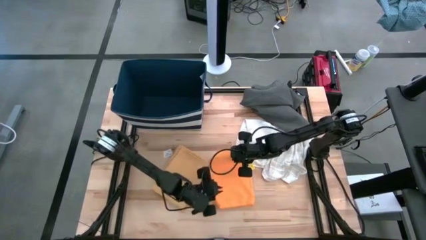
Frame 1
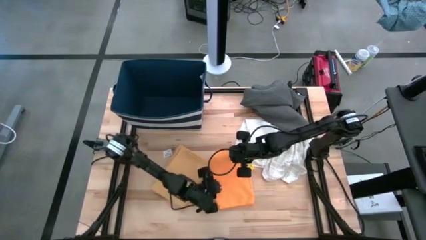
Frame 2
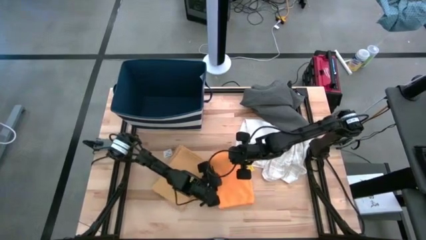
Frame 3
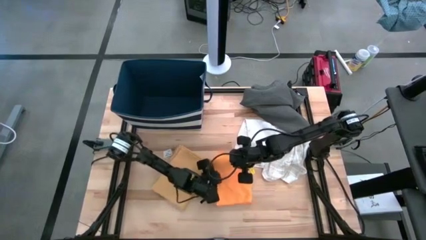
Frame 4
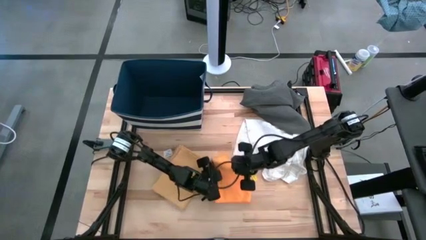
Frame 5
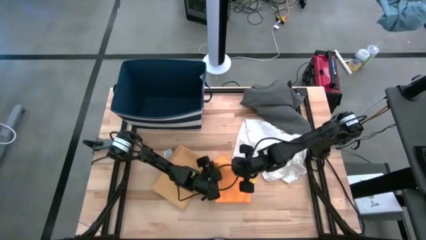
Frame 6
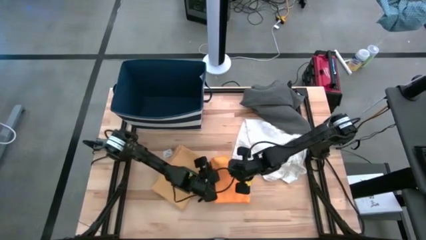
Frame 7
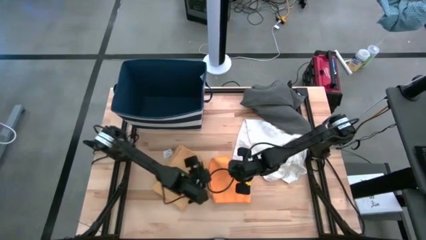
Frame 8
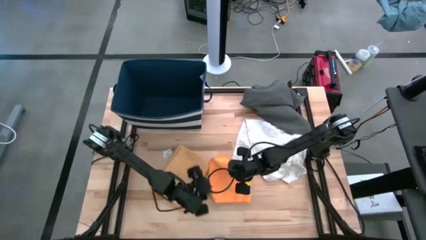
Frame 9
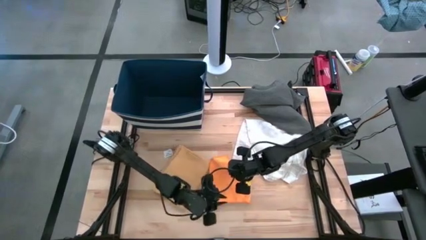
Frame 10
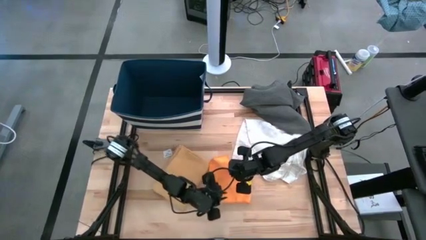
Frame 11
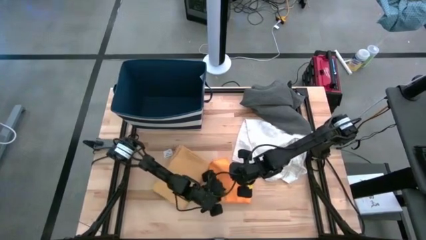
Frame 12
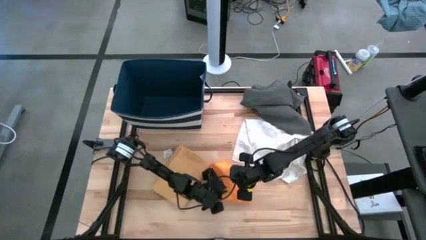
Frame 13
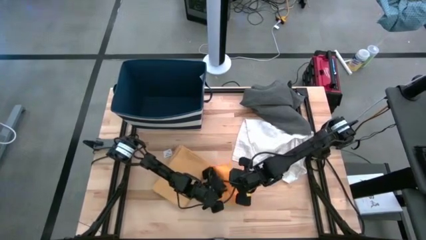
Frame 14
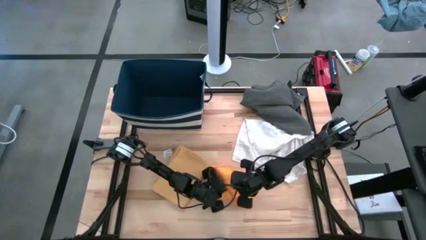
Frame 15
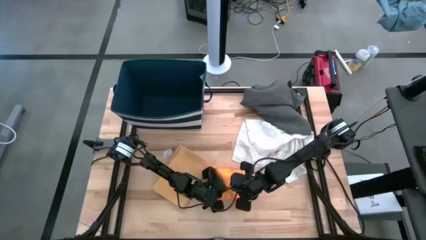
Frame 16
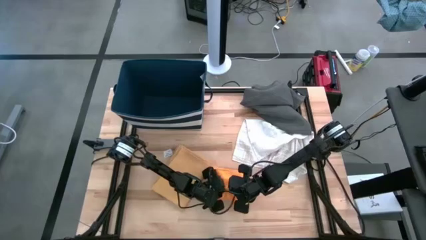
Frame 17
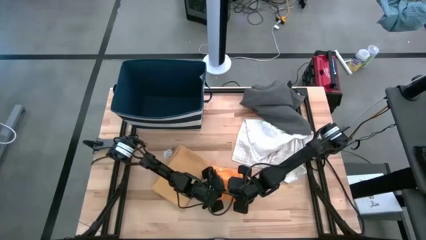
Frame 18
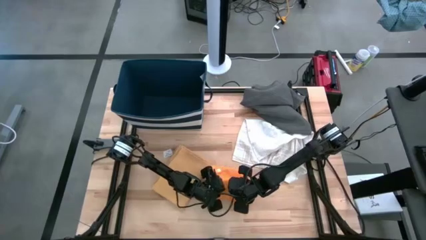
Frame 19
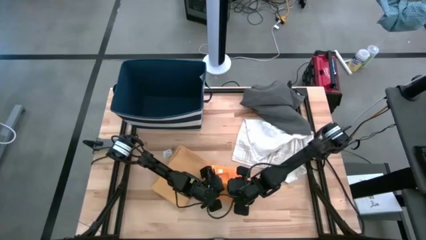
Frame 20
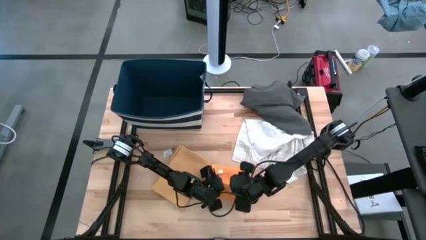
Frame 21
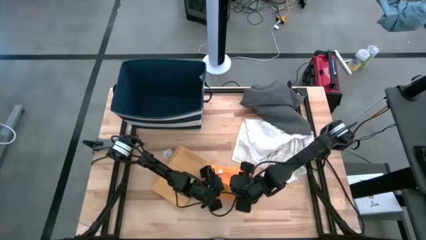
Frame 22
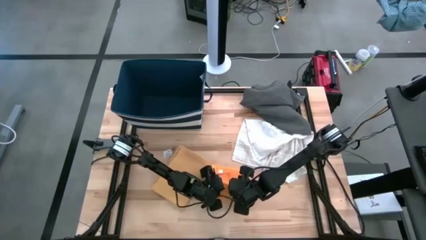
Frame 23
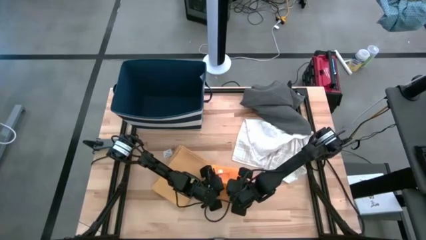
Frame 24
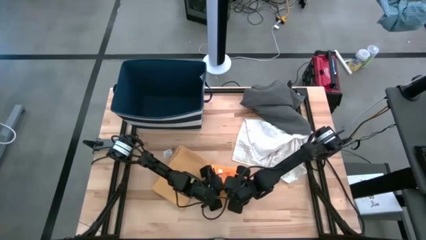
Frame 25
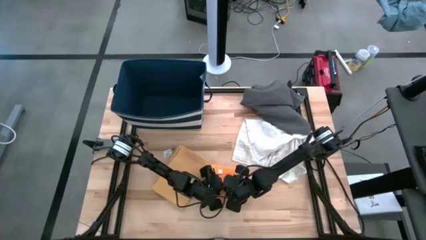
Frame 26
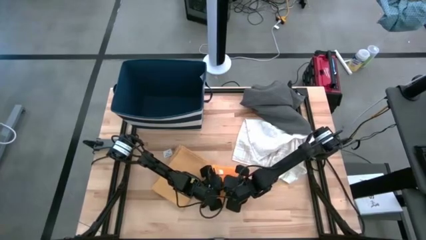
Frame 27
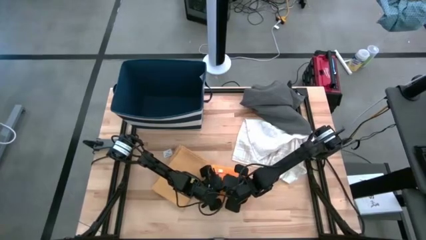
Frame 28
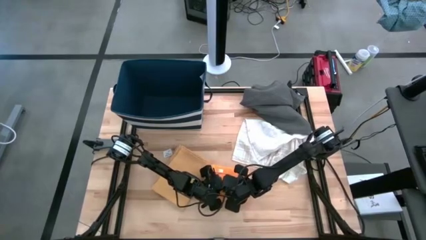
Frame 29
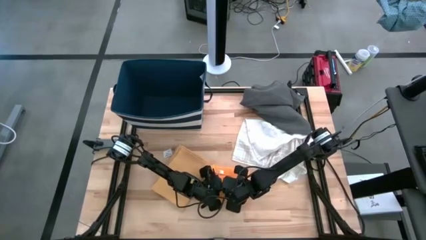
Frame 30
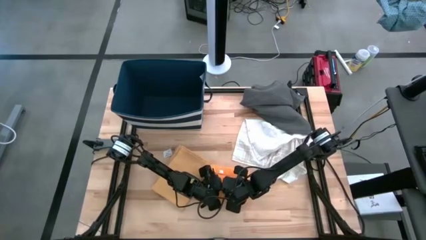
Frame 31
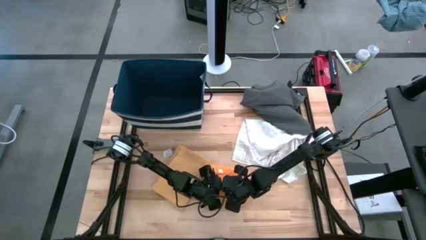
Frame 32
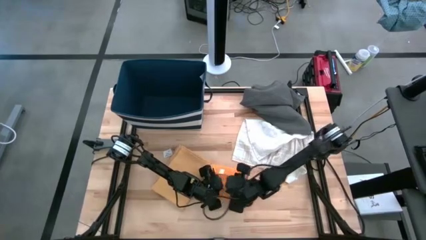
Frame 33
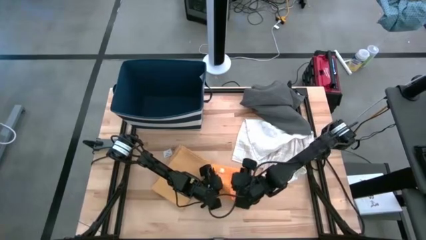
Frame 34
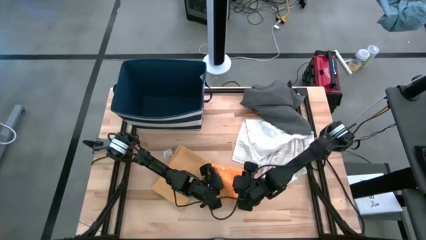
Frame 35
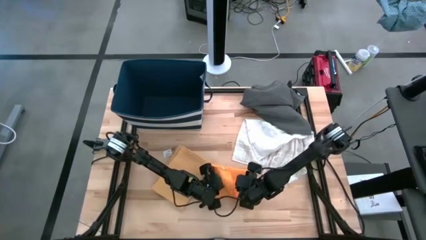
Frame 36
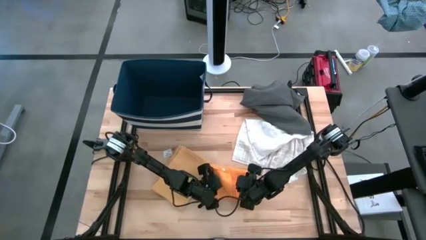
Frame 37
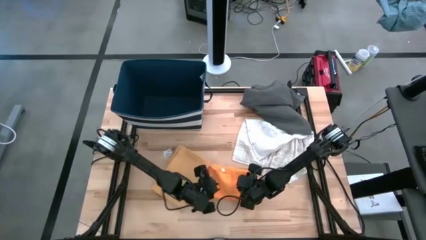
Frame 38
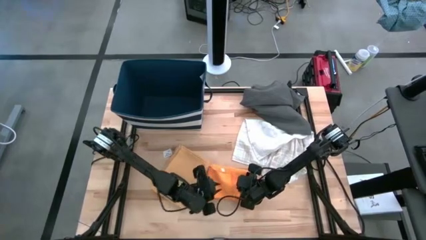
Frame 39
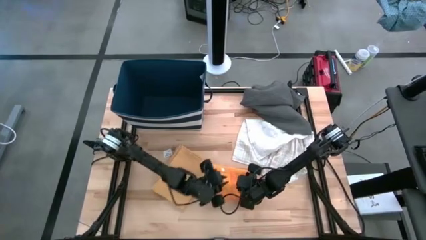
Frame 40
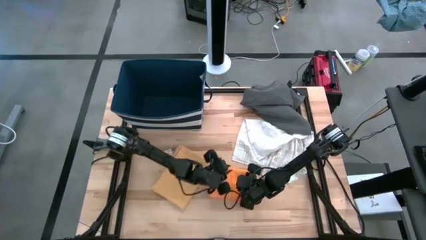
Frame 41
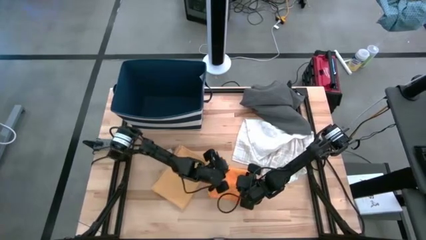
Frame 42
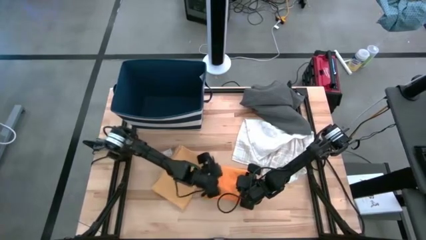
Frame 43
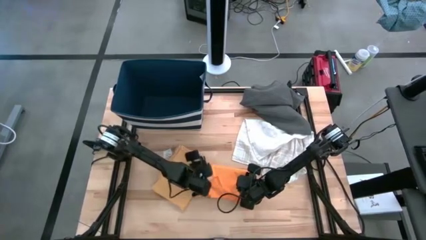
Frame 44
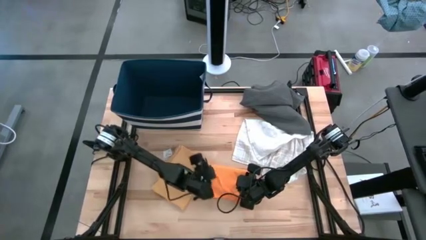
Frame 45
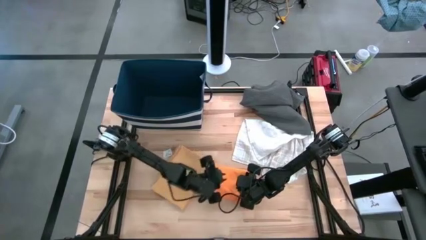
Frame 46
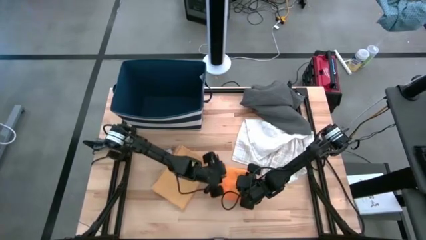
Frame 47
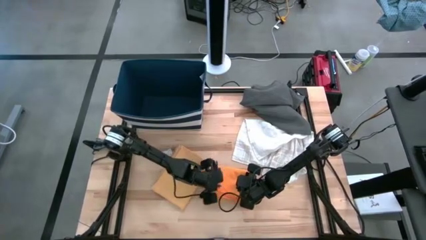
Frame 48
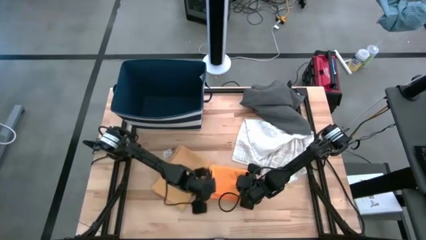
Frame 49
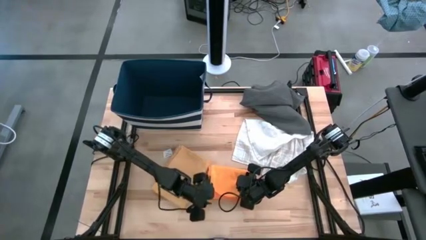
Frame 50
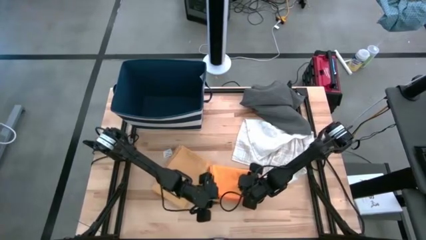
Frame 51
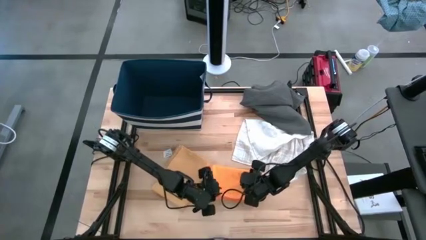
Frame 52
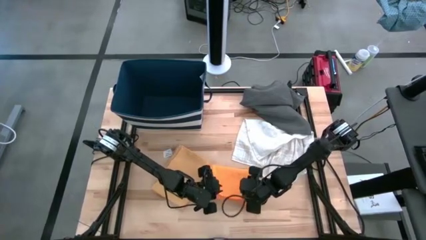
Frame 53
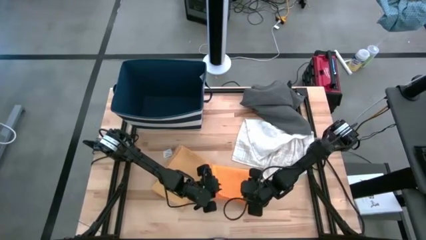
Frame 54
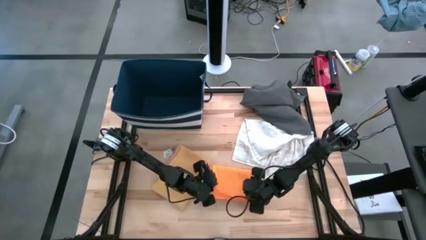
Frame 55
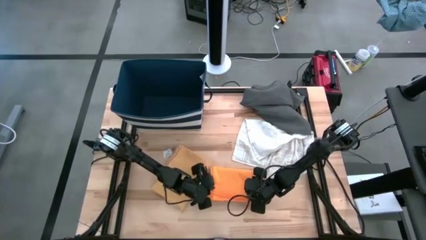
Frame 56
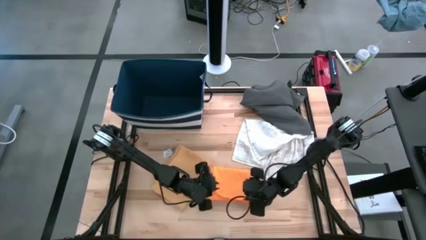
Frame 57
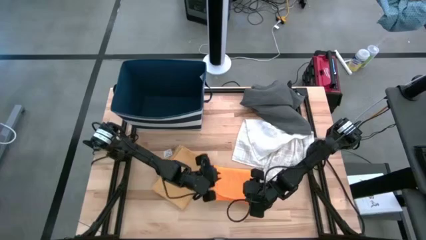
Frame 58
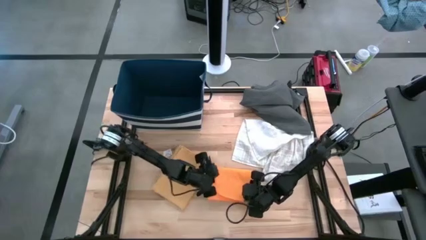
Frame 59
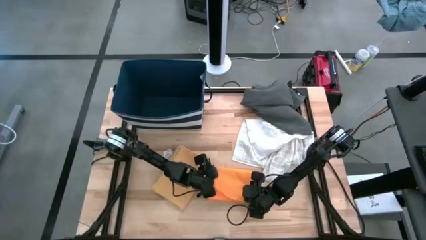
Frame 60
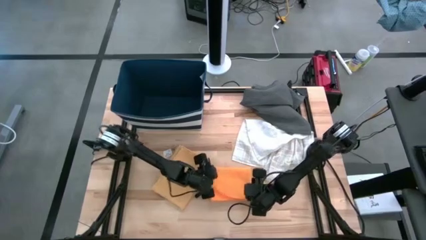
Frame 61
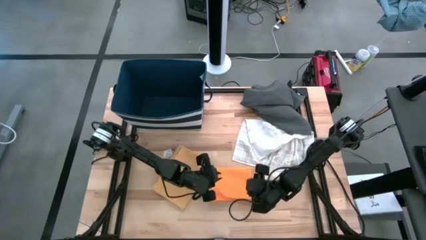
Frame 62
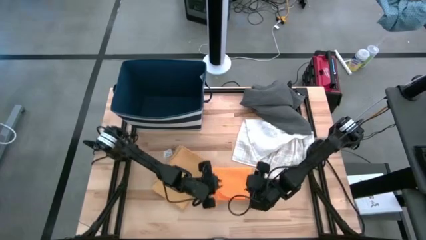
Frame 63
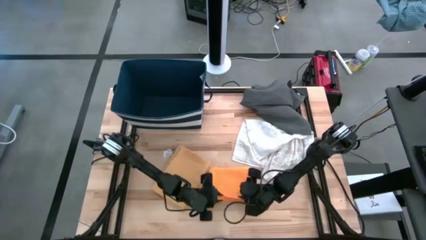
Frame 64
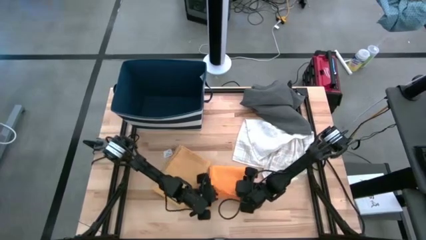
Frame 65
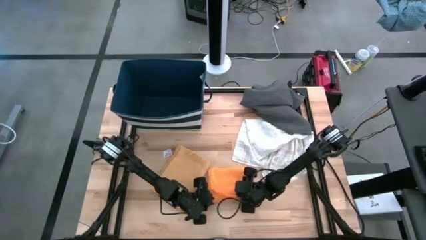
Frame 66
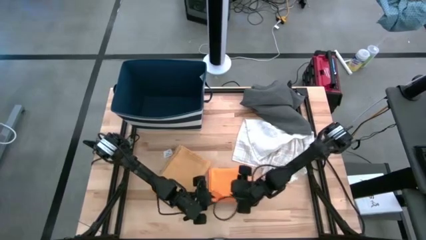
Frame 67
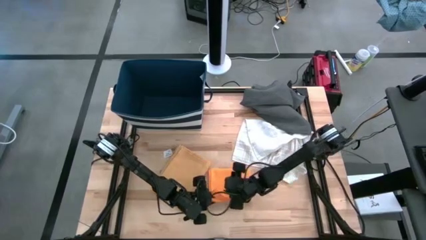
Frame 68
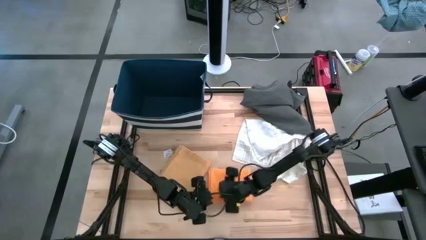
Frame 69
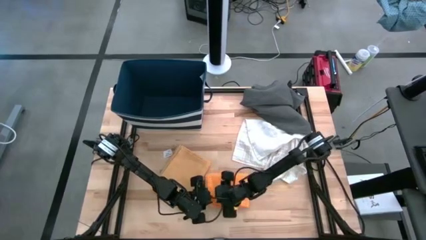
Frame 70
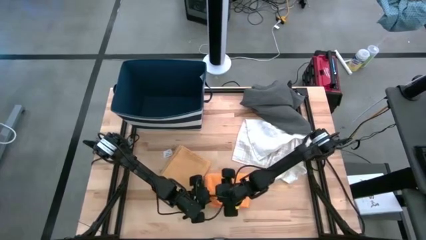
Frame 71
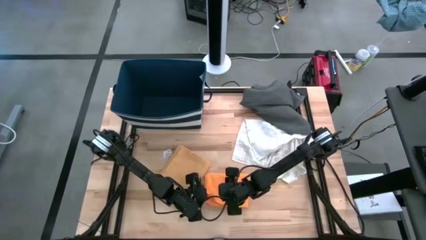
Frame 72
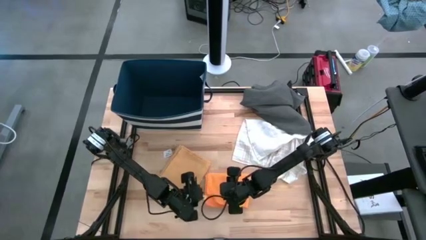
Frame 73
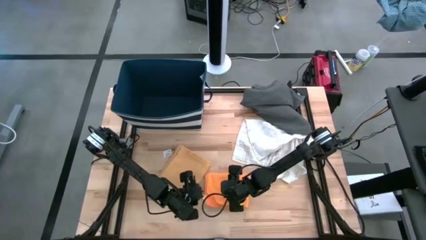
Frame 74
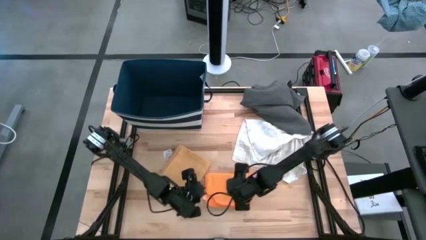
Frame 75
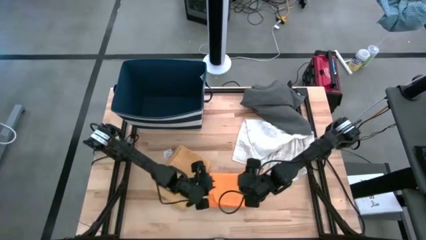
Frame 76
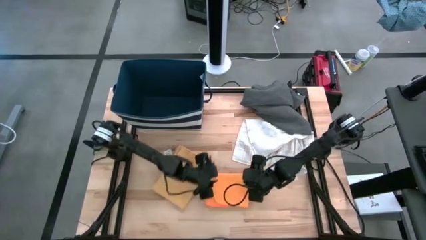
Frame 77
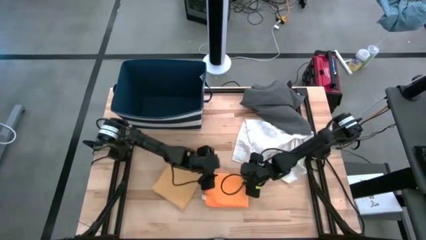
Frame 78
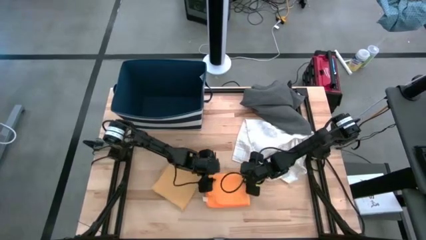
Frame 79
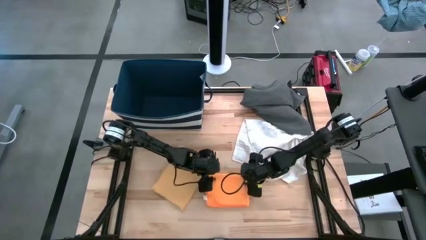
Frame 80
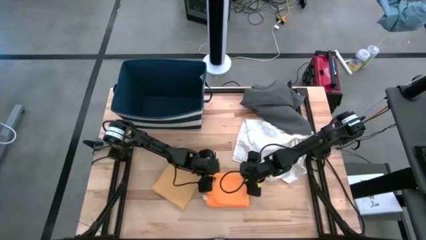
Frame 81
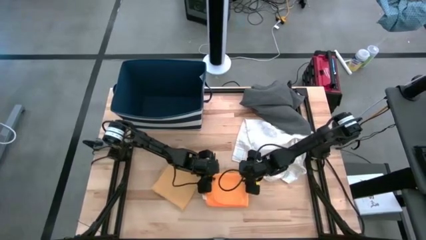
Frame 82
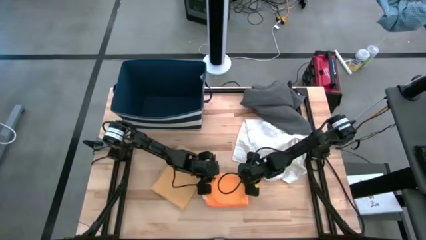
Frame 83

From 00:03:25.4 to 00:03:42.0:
Task: Fold towel
Fold the orange kitchen towel

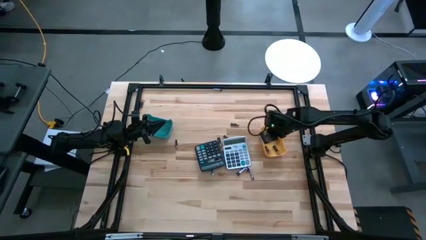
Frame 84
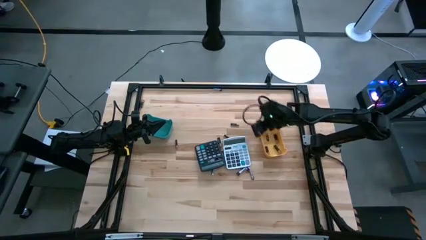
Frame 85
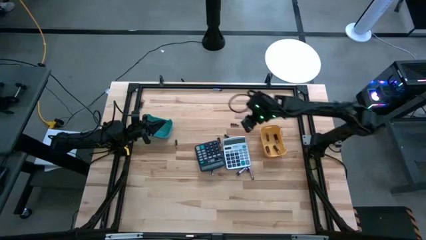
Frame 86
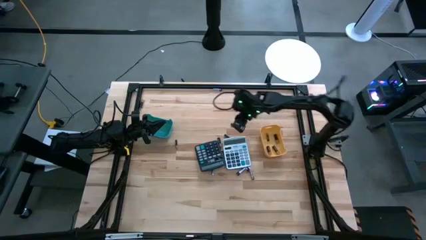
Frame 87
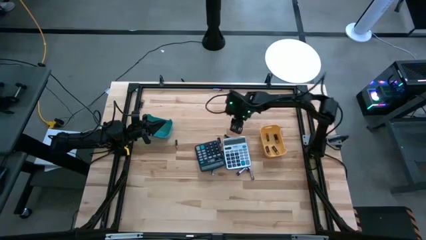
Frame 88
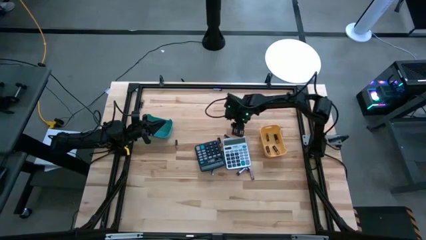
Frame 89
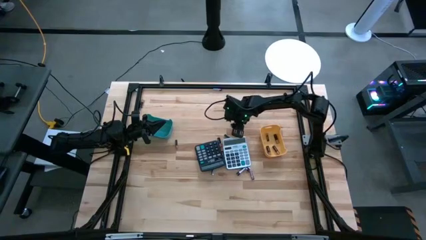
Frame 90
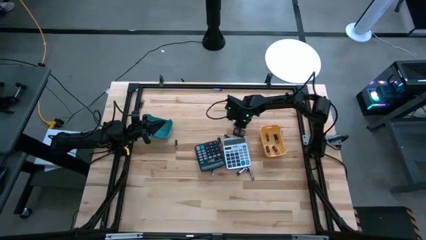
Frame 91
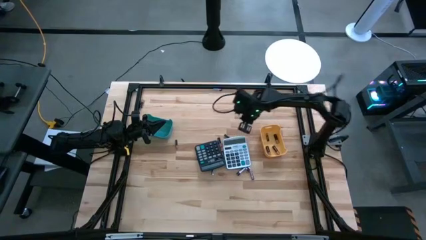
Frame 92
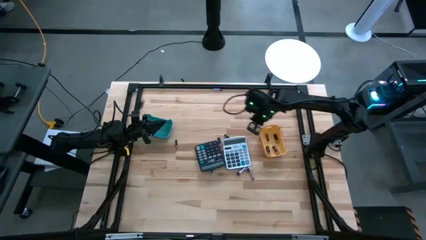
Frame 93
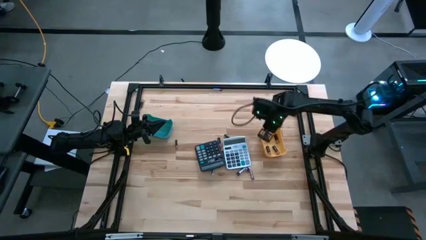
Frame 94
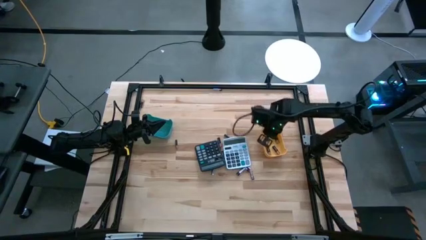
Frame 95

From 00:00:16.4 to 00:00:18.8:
Task: Sort batteries
Put the black battery into the yellow bin
